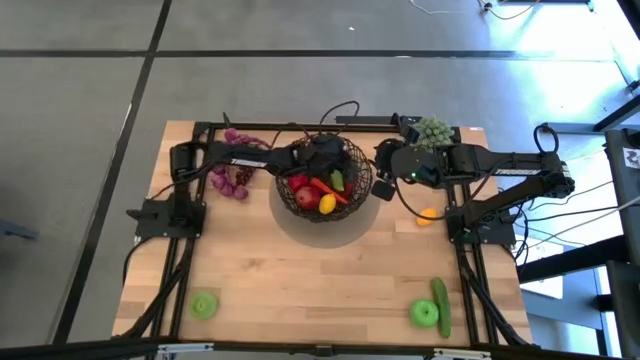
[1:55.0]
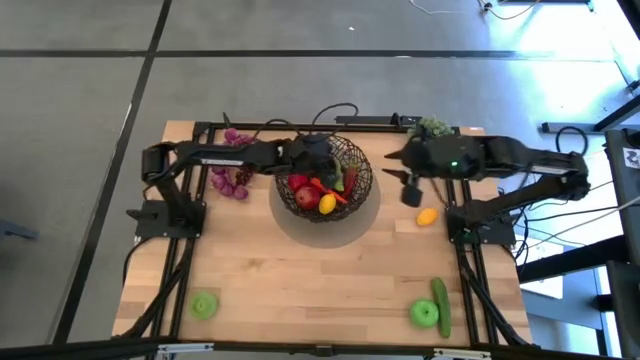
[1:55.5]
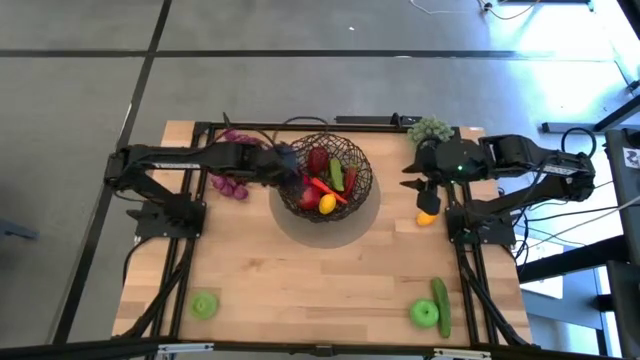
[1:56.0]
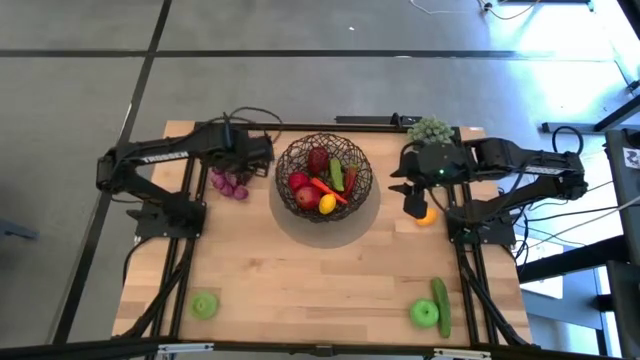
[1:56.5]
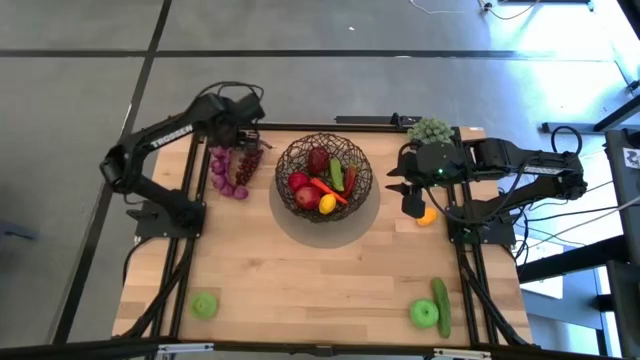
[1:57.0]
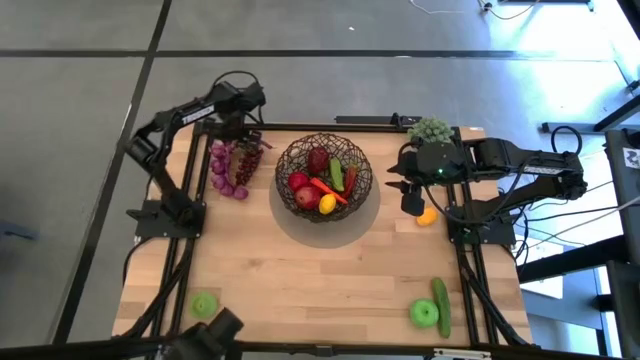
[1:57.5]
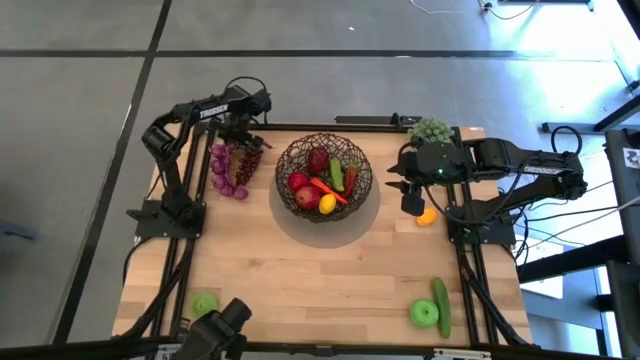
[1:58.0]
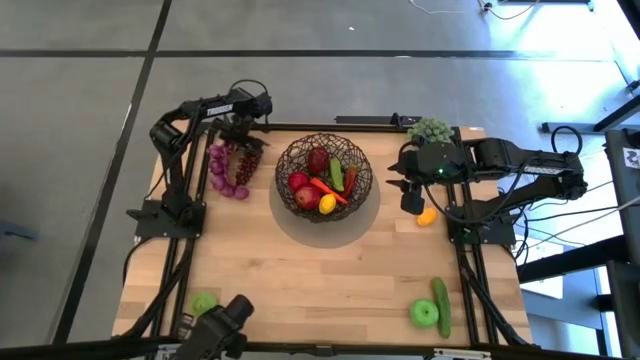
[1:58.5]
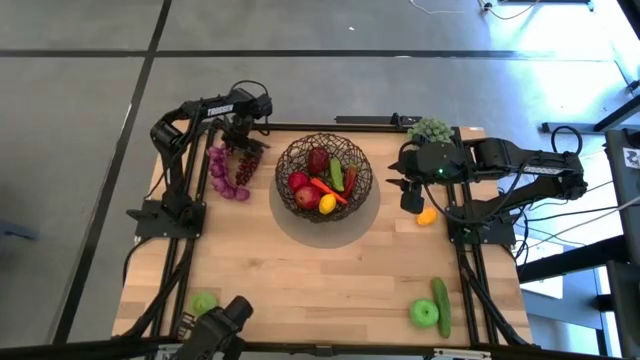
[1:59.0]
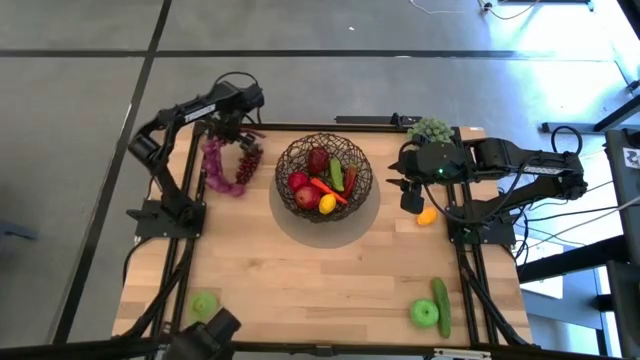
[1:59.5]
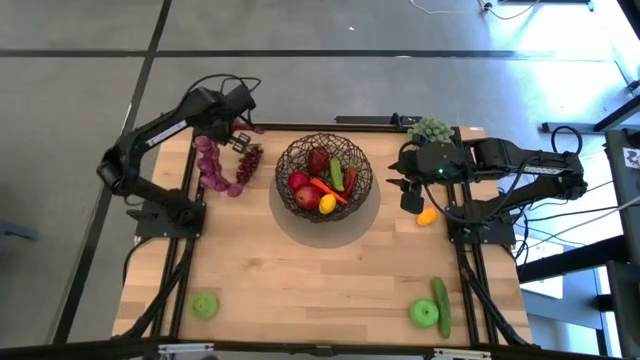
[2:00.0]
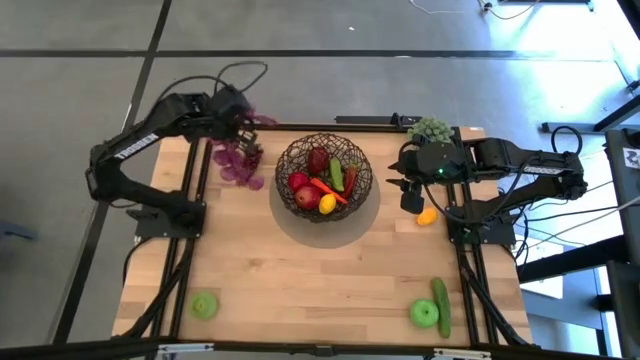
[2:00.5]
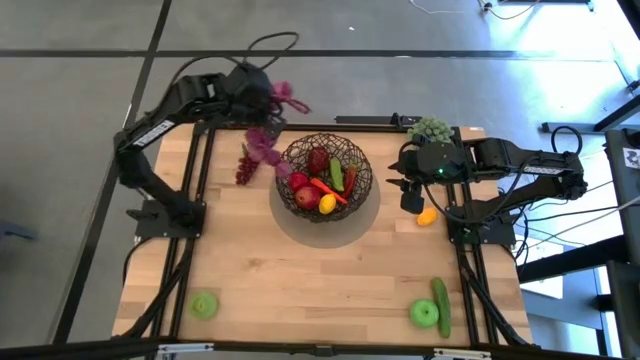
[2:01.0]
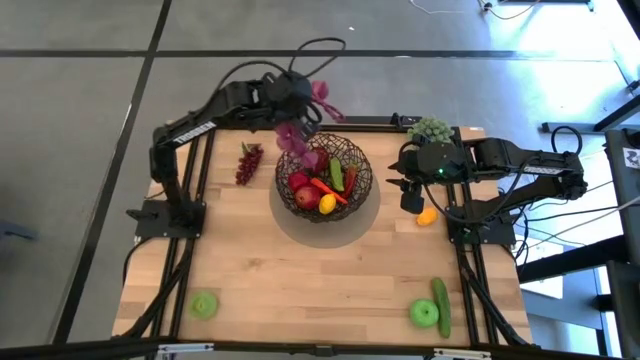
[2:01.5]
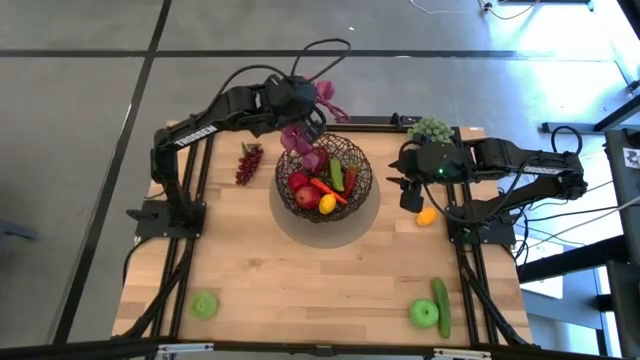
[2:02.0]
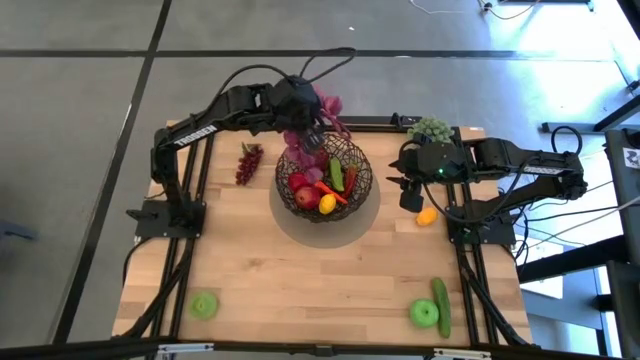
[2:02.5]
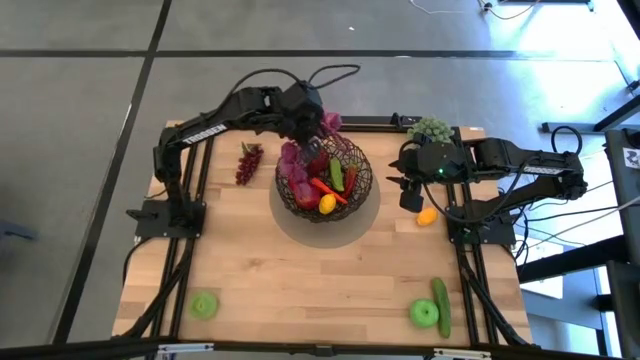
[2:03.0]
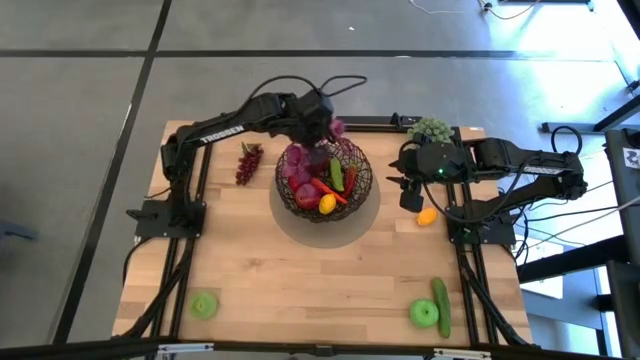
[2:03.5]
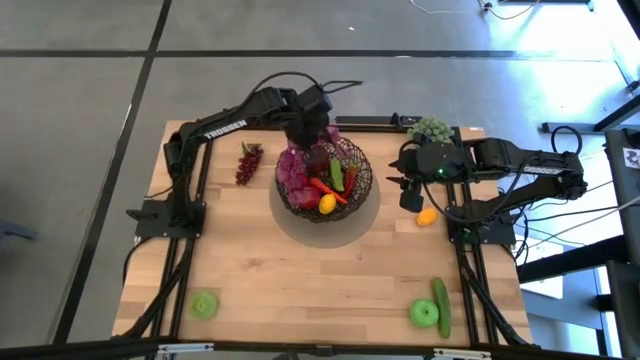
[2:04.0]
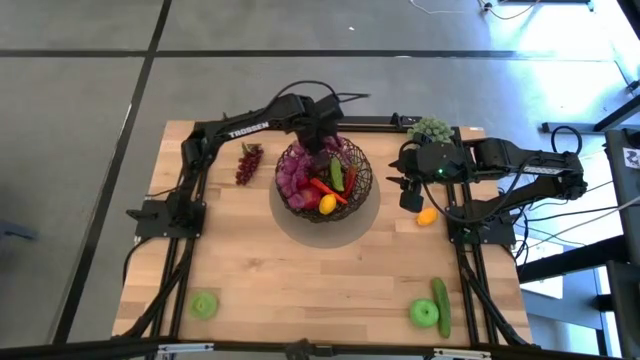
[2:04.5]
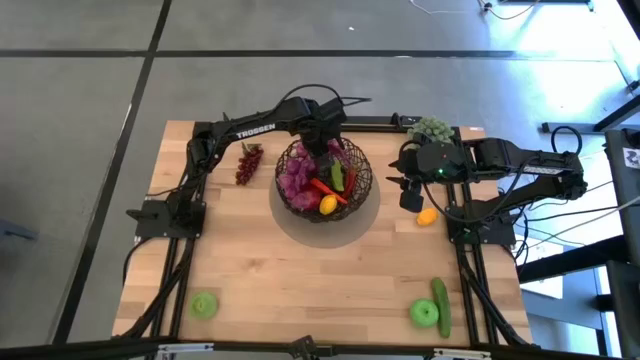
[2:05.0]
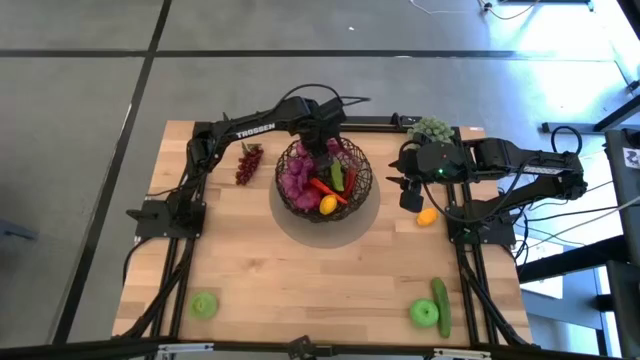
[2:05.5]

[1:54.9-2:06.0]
Task: Build produce basket
Put the garlics into the wire basket

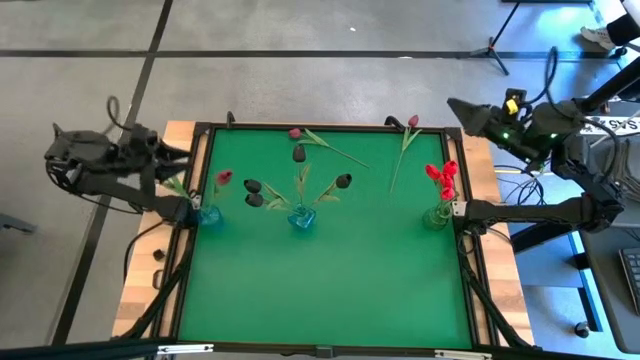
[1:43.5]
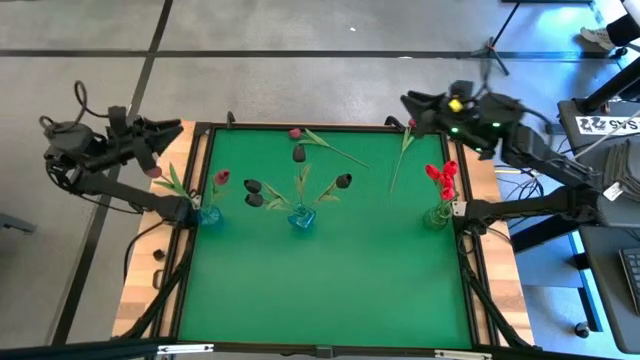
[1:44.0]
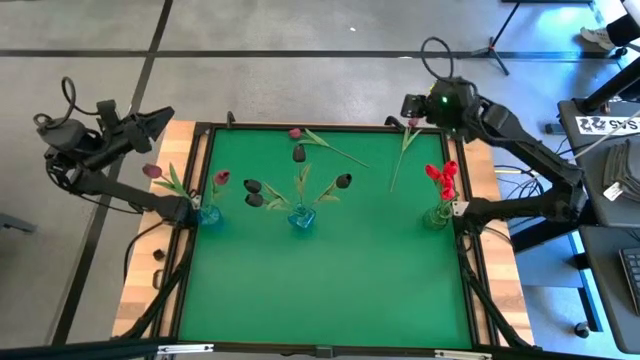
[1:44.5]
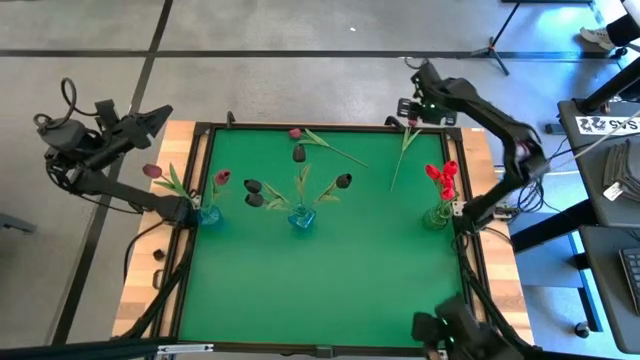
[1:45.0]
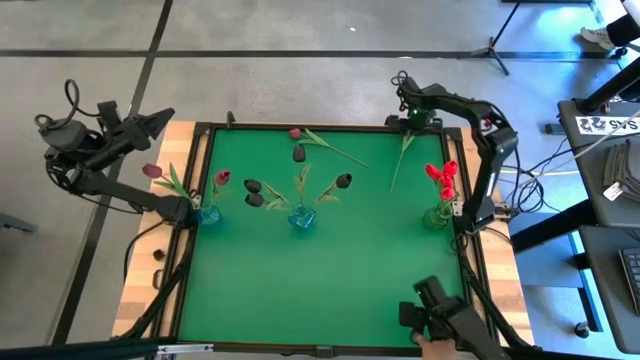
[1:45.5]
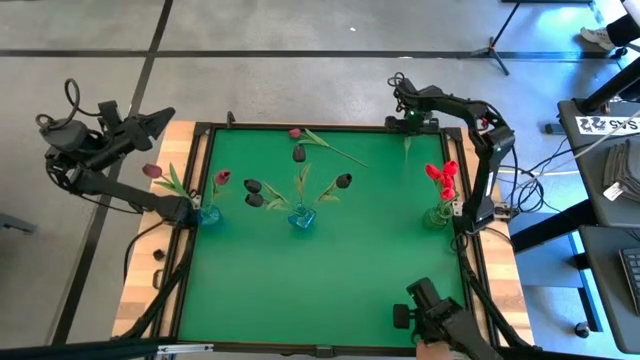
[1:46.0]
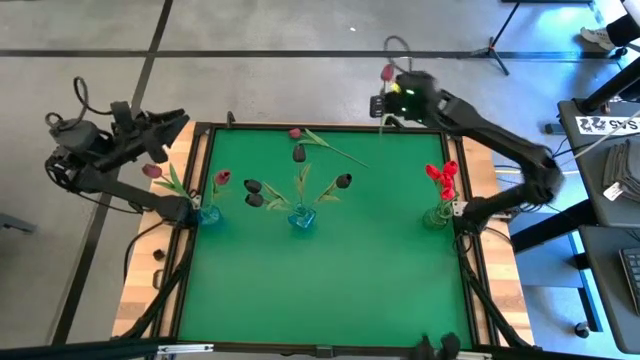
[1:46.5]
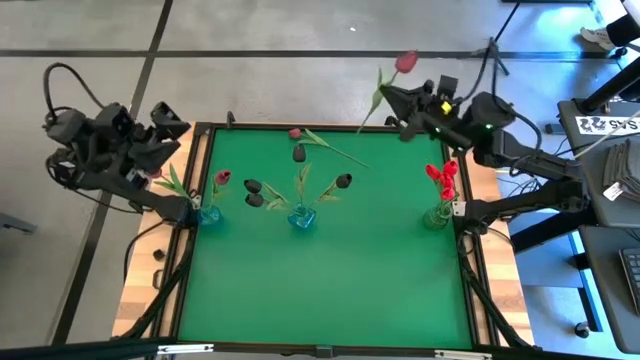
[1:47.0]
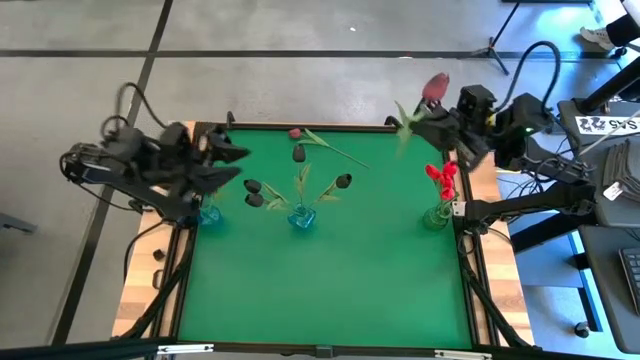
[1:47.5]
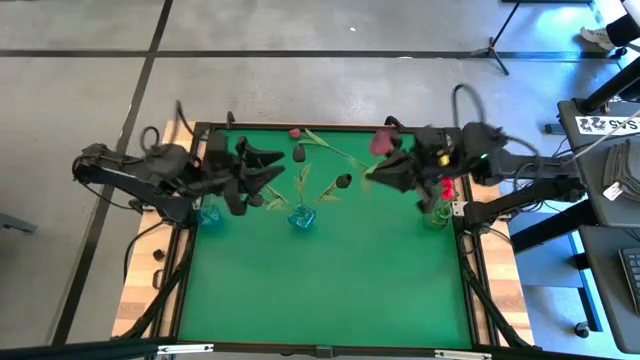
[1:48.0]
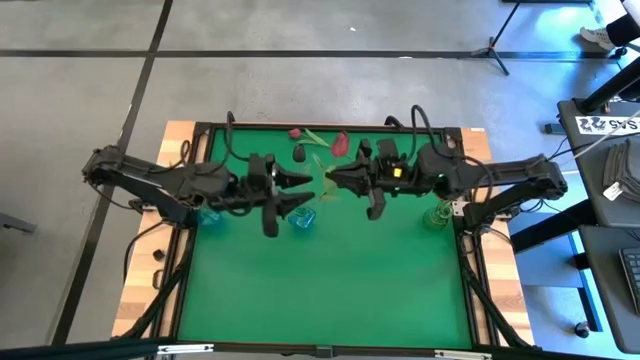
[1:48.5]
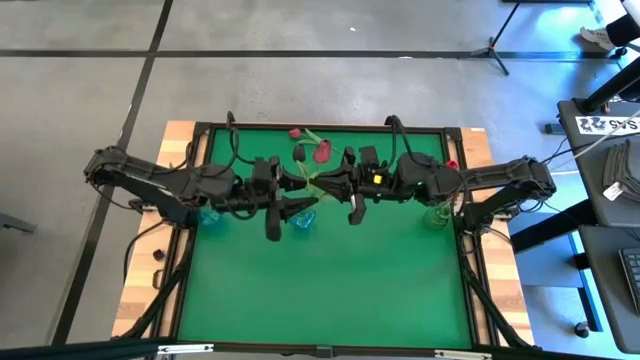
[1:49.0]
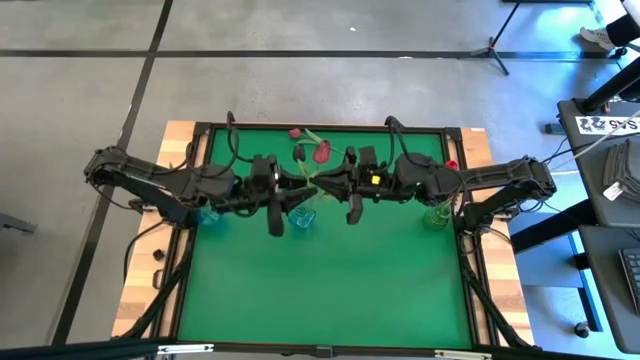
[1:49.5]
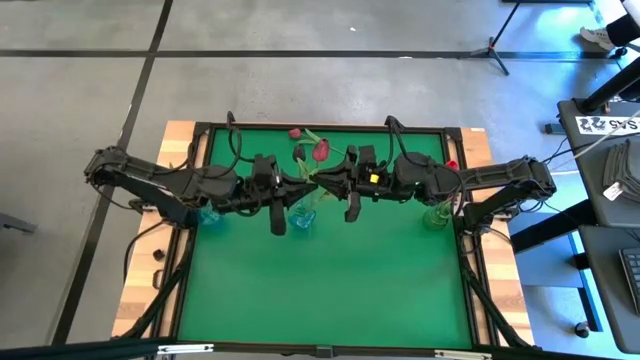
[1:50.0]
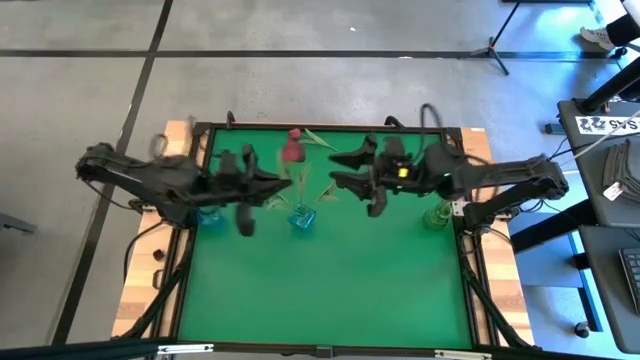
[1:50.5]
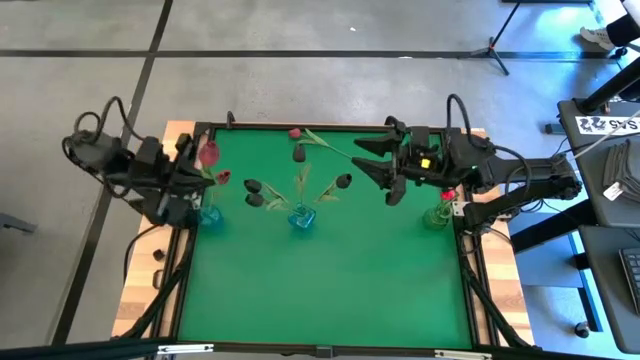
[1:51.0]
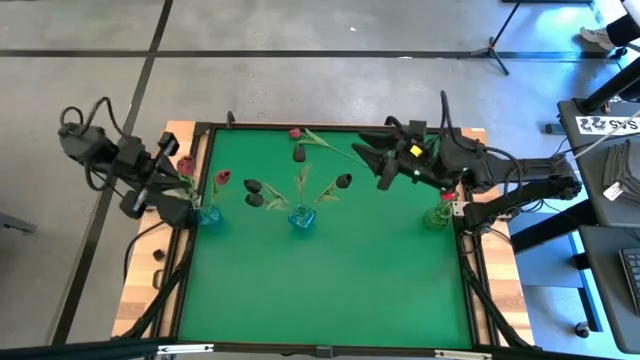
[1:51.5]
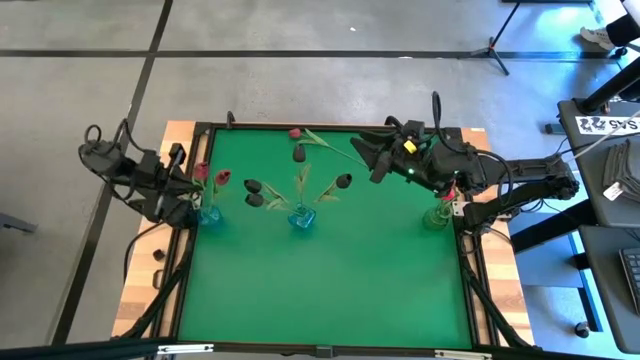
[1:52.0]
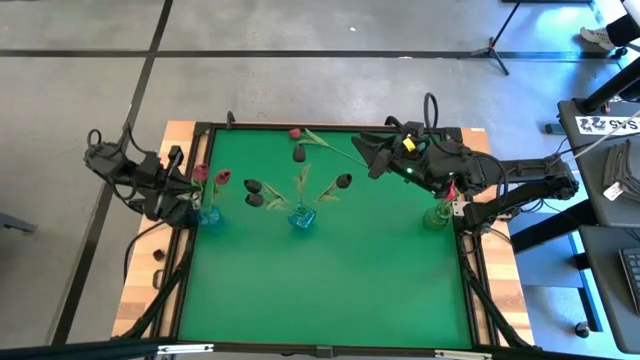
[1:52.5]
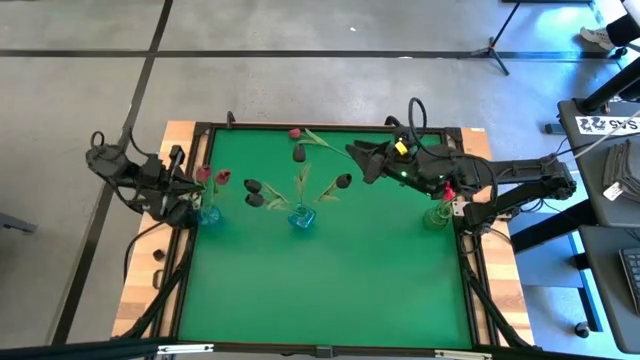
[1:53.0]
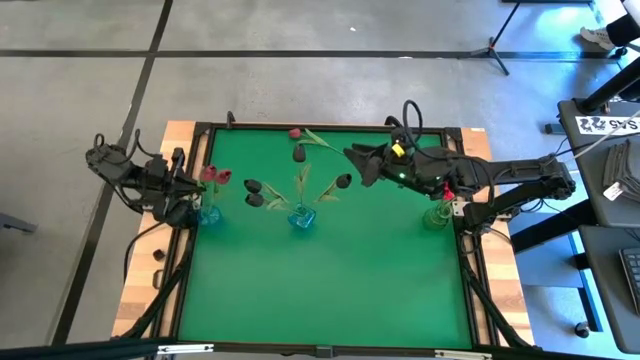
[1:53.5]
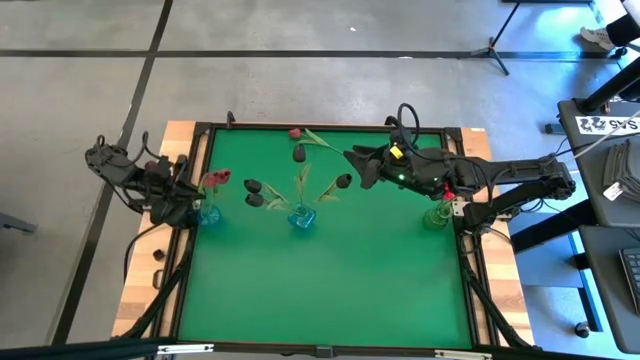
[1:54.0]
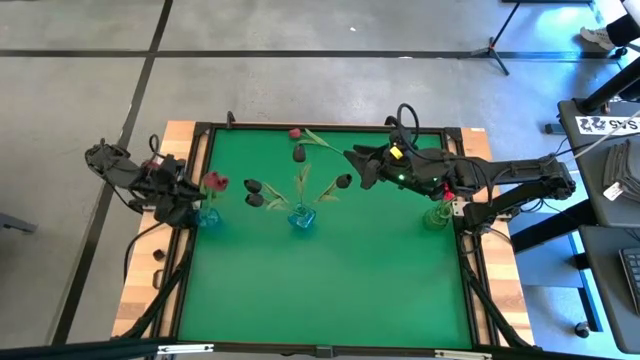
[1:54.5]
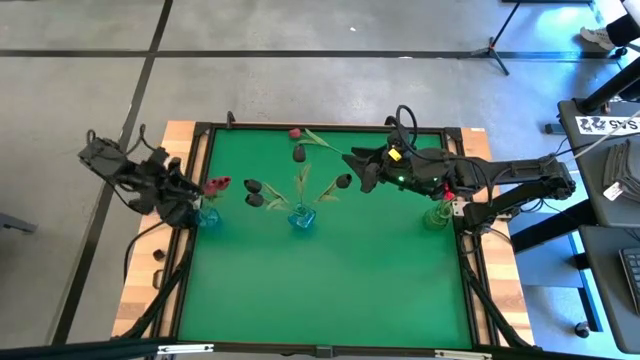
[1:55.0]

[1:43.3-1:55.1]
Task: Sort flowers into vase by color
Put the right pink tulip into the left blue vase
